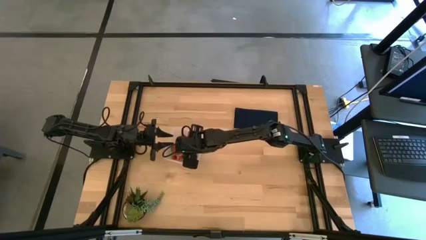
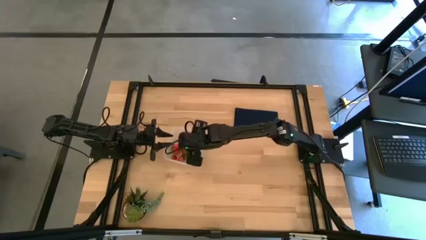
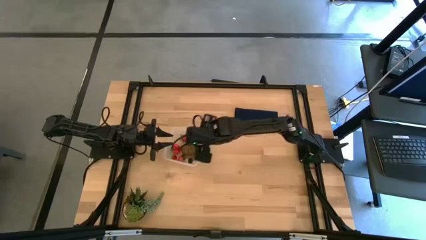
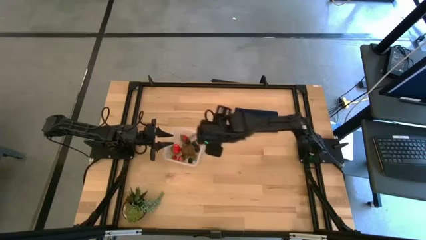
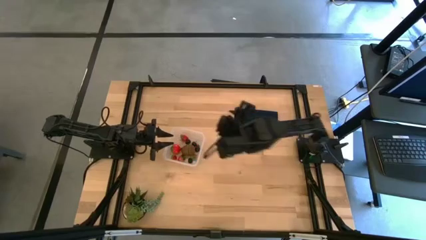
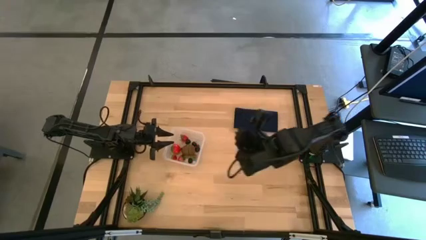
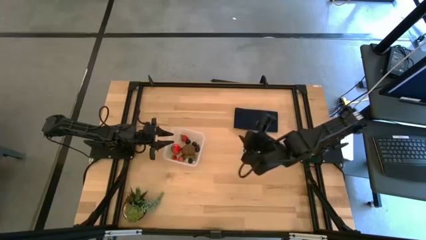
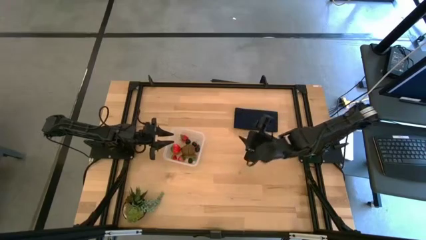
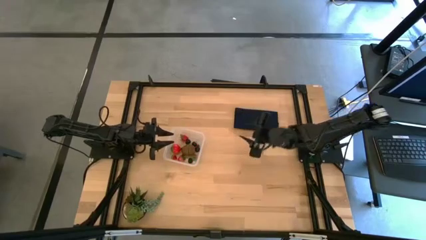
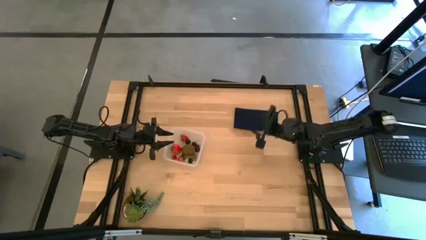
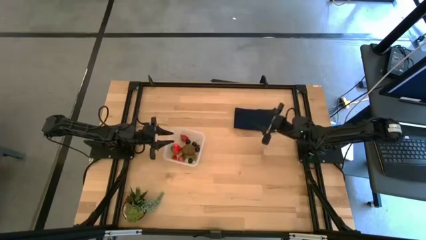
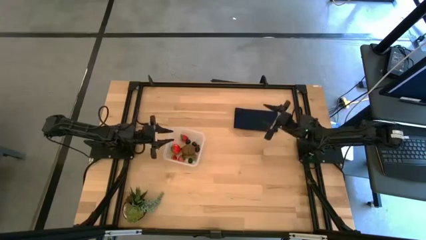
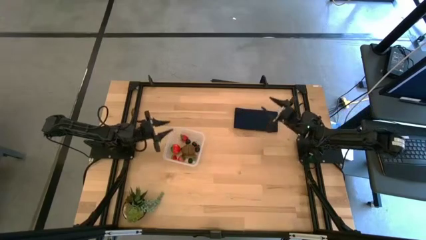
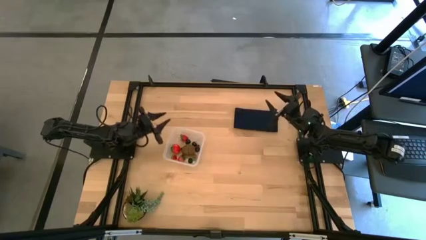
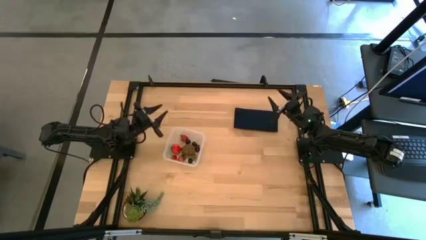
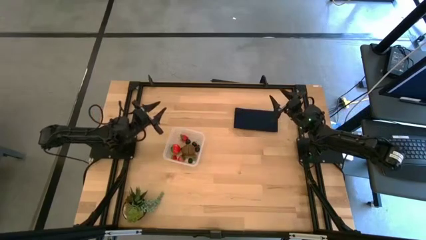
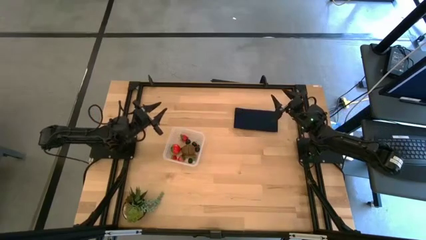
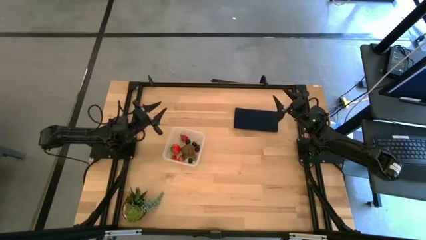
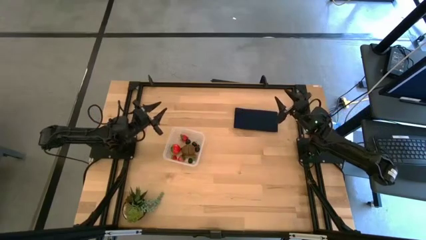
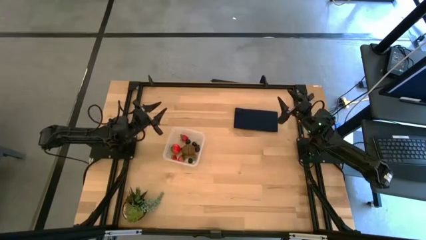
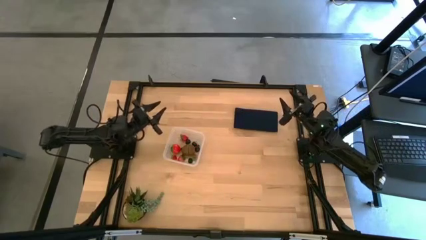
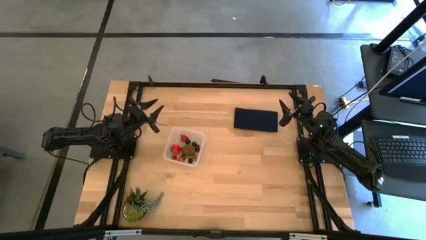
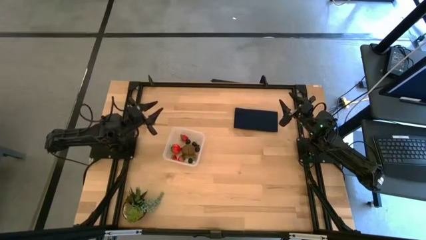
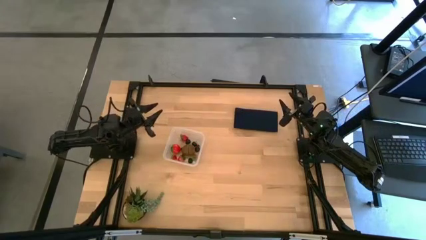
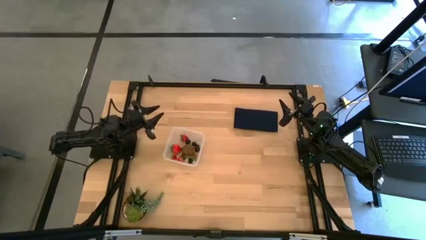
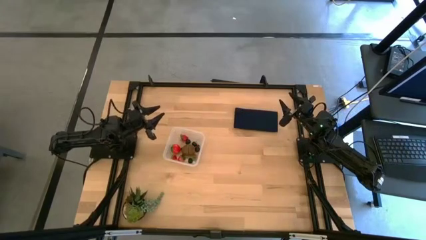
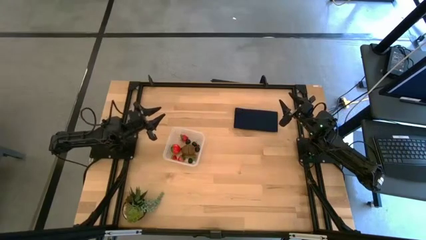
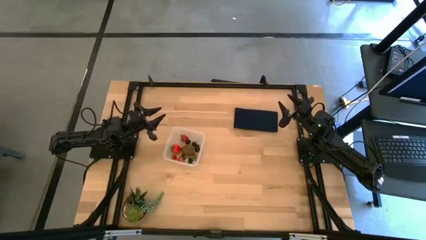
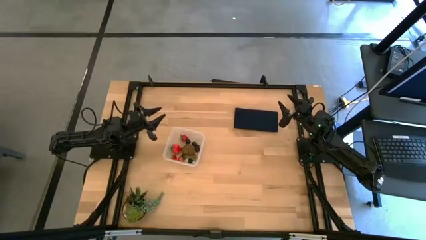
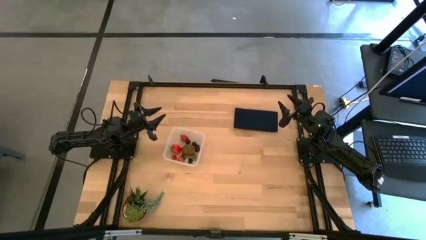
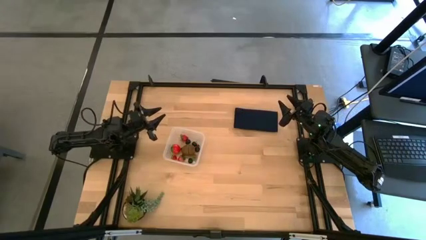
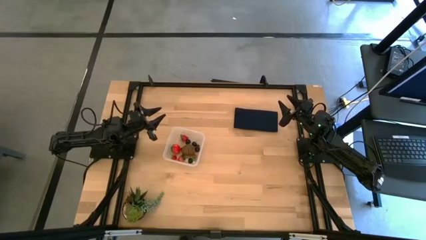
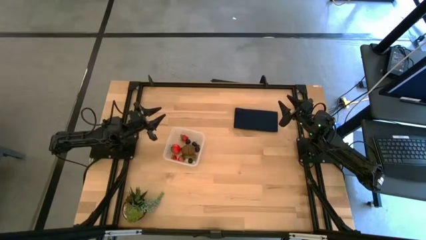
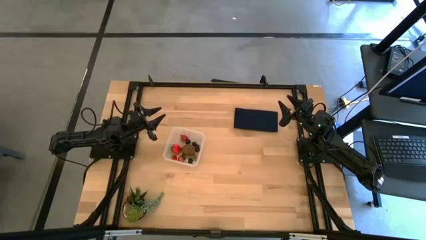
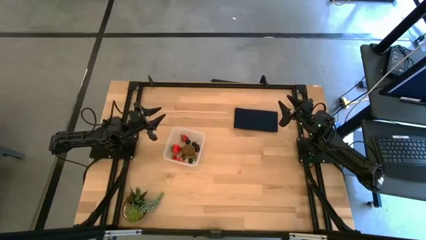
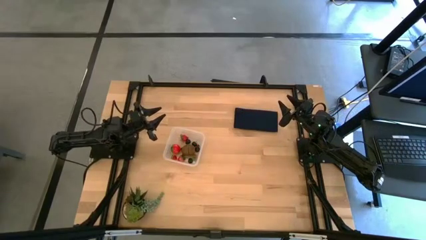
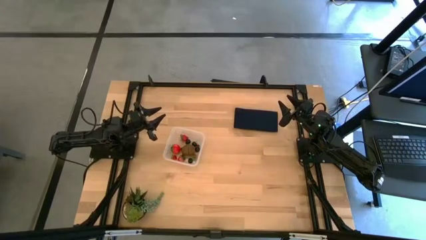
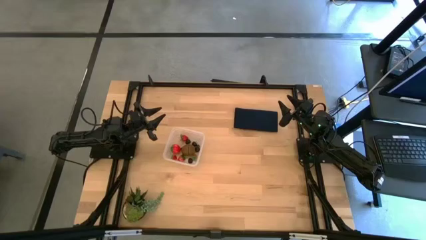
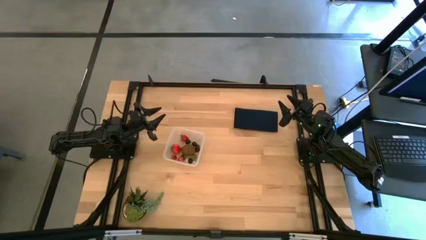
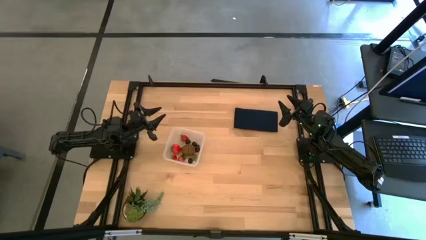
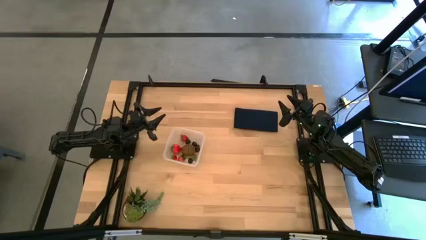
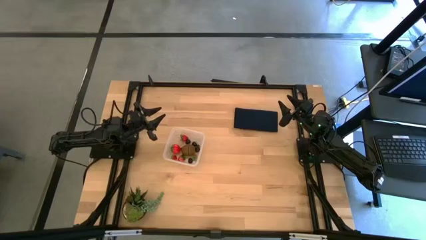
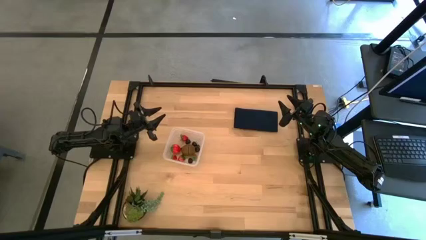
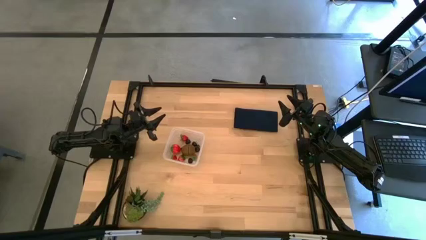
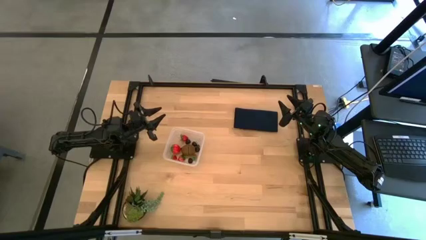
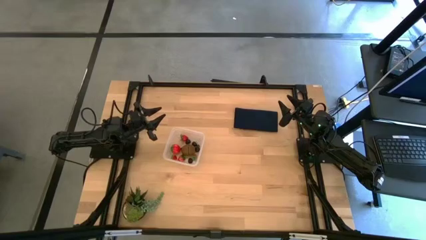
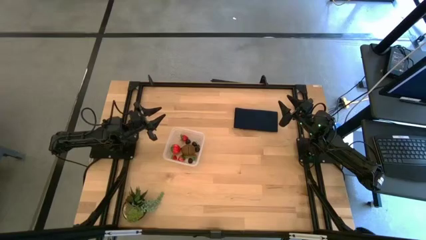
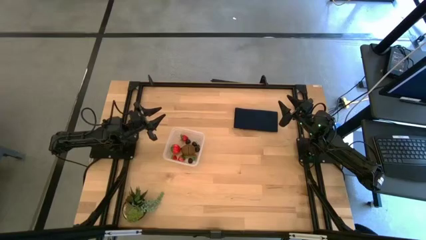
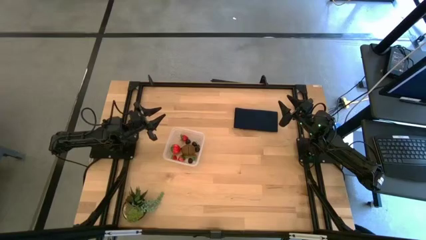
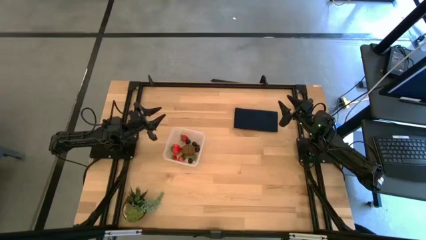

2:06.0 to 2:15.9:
Task: Pick and placing Produce into tupperware
Return to home position

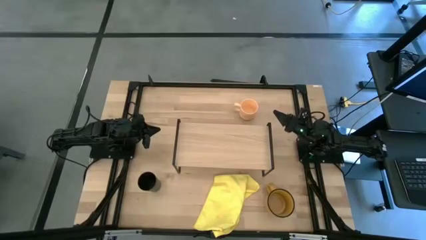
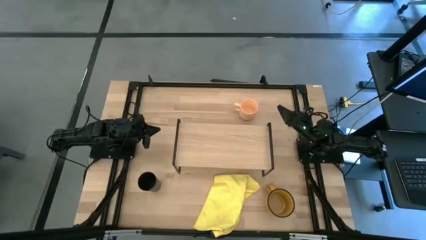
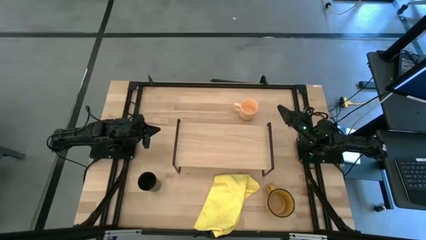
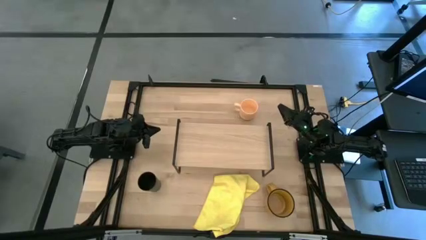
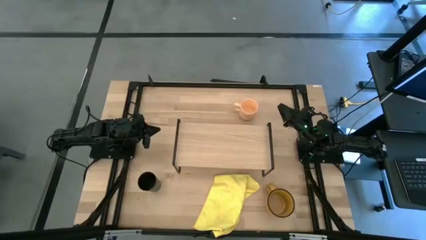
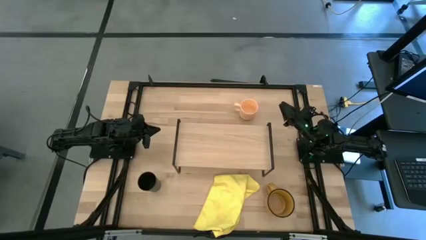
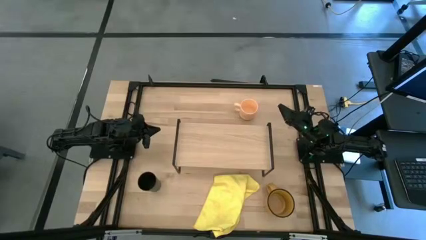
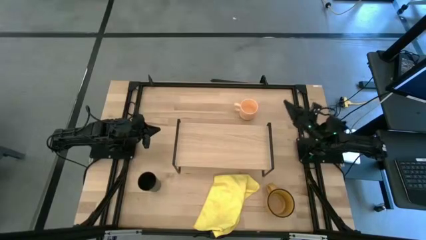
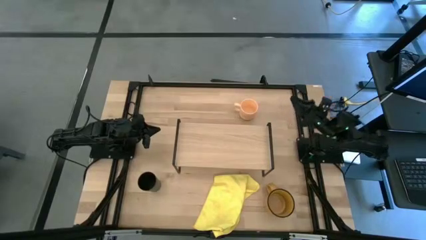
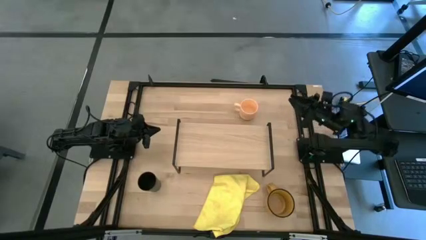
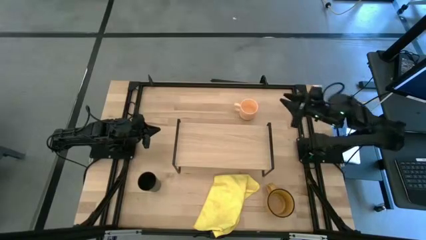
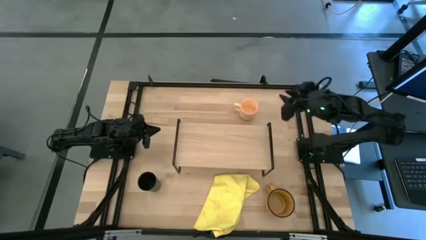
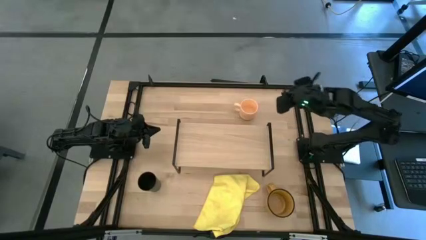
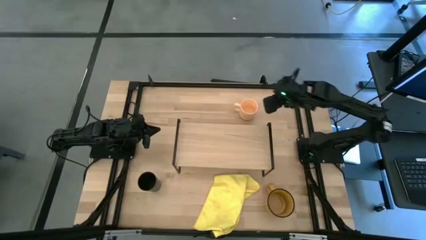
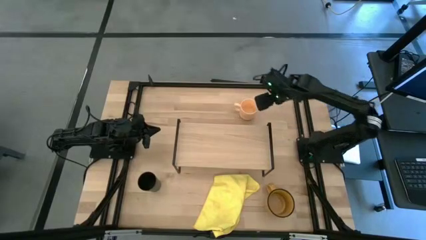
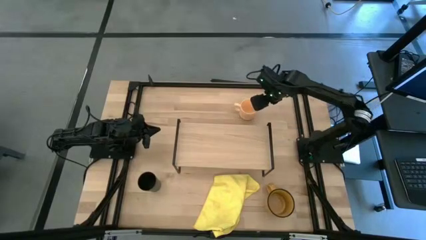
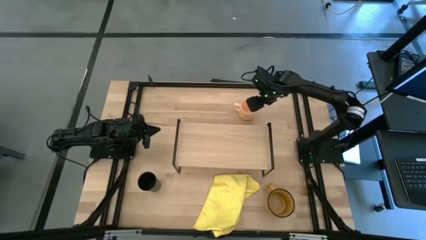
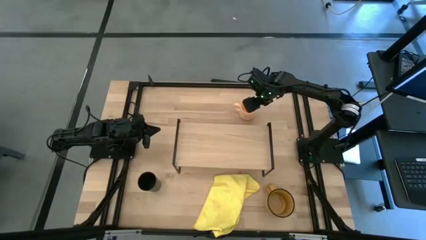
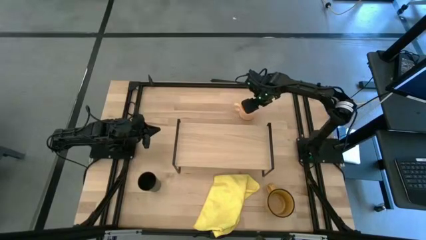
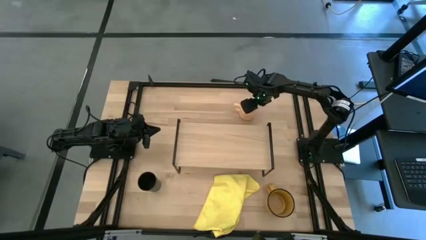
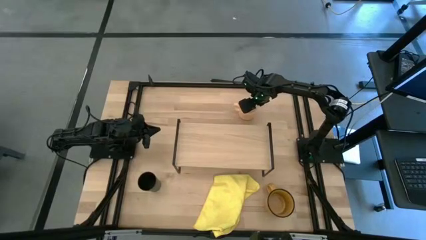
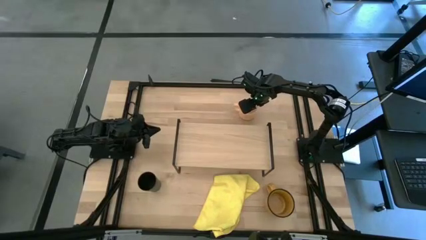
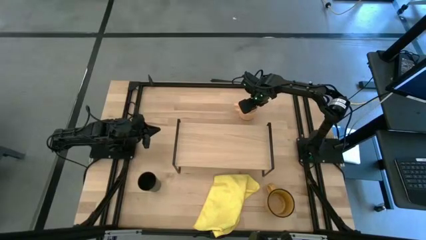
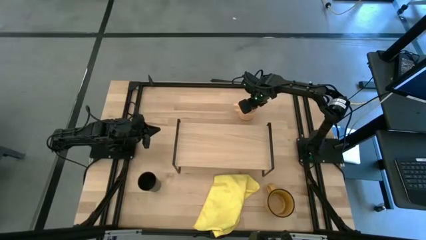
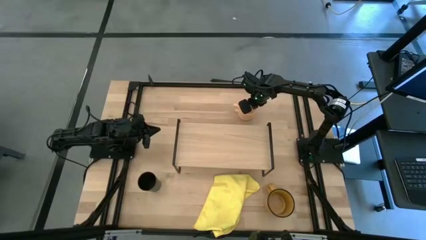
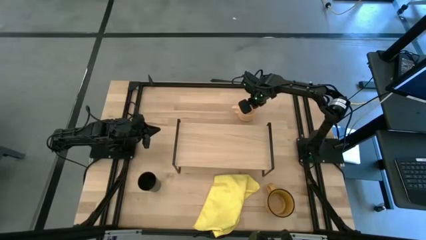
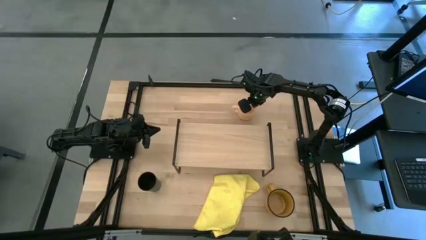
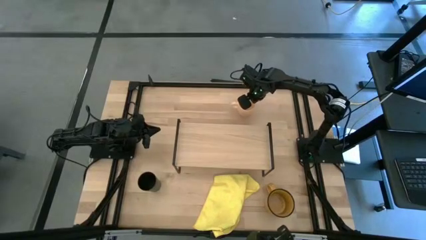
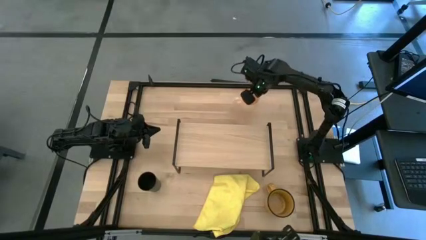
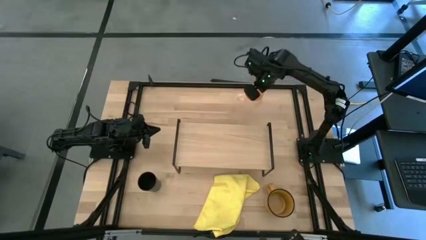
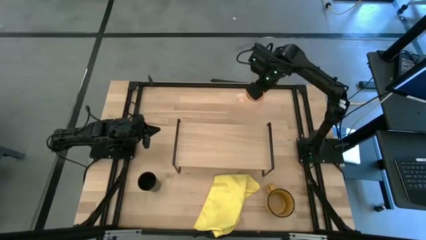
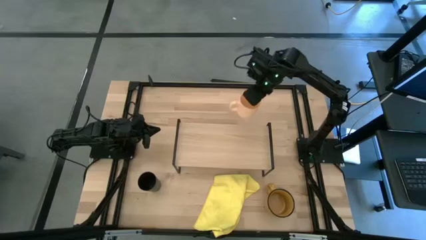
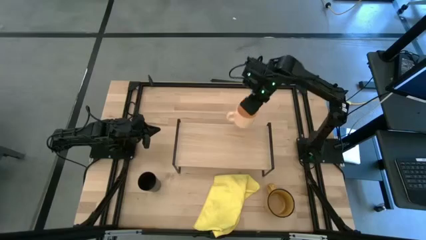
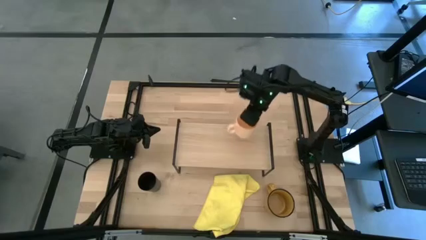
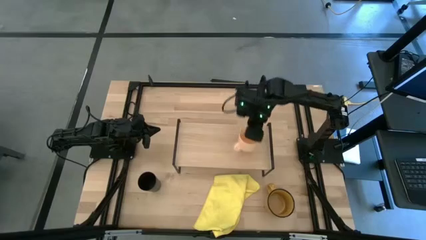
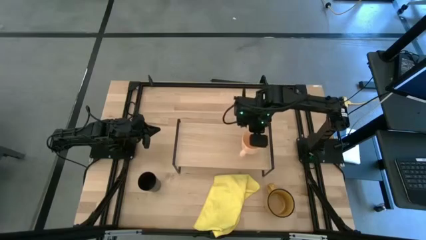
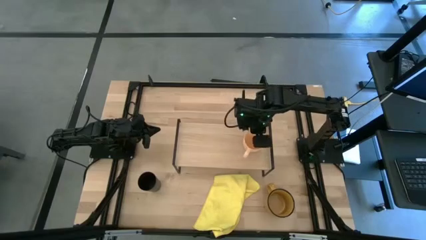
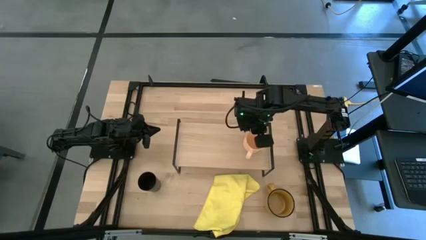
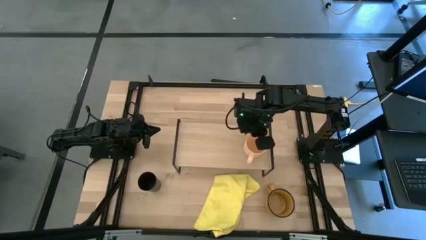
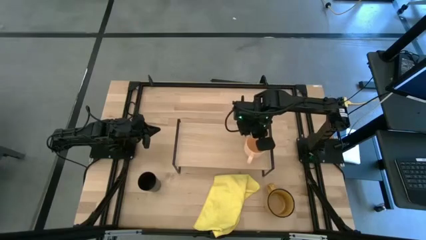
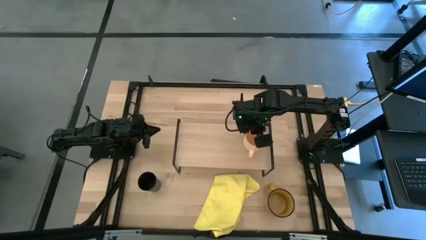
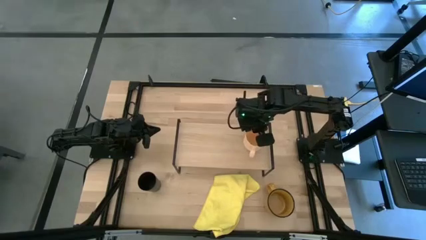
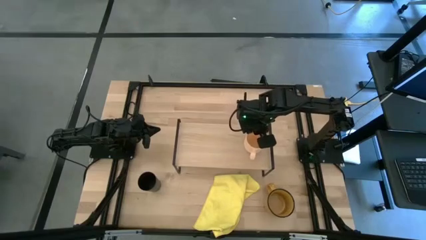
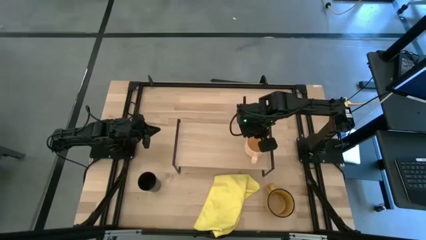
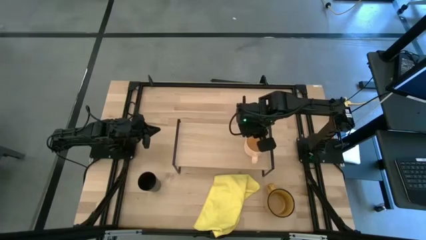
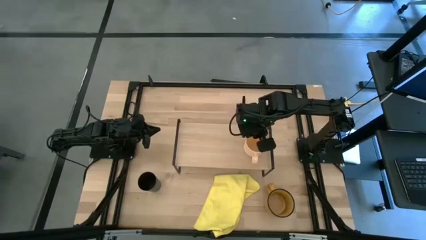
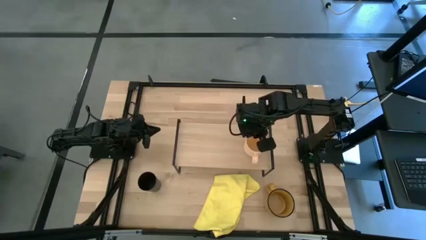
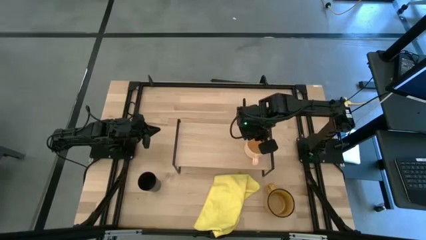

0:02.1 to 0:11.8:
Task: Stack small to large cups/mugs on shelf
Put the orange mug on the shelf
